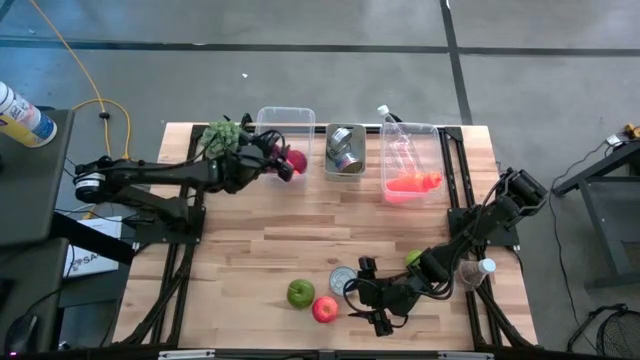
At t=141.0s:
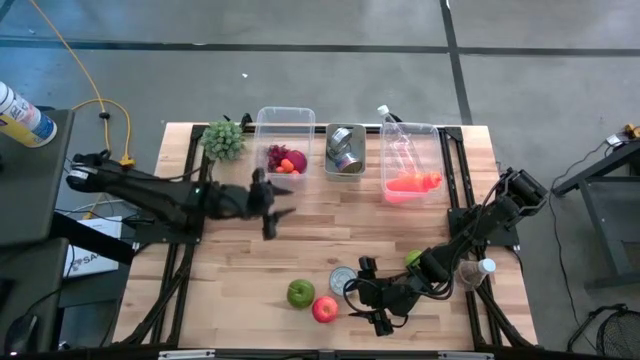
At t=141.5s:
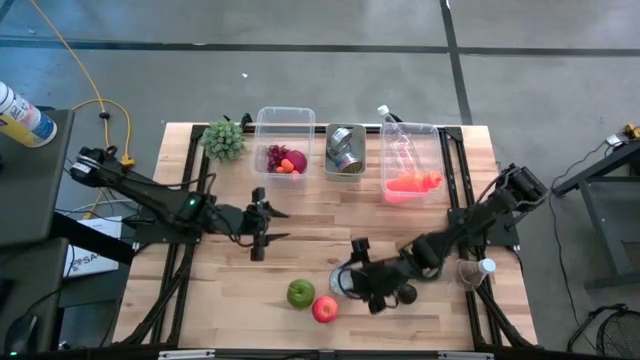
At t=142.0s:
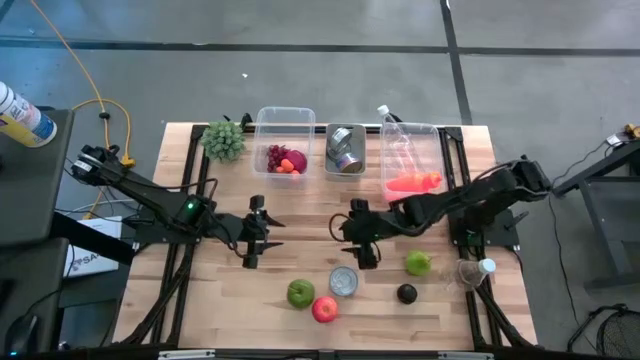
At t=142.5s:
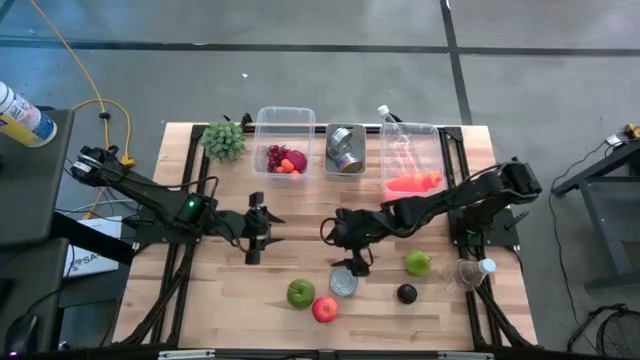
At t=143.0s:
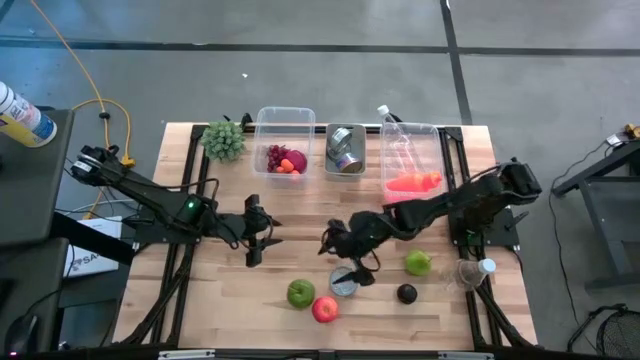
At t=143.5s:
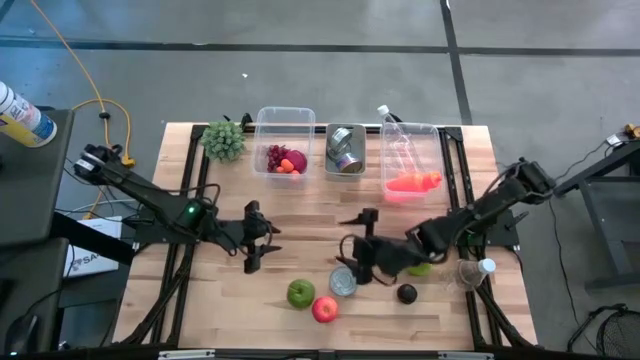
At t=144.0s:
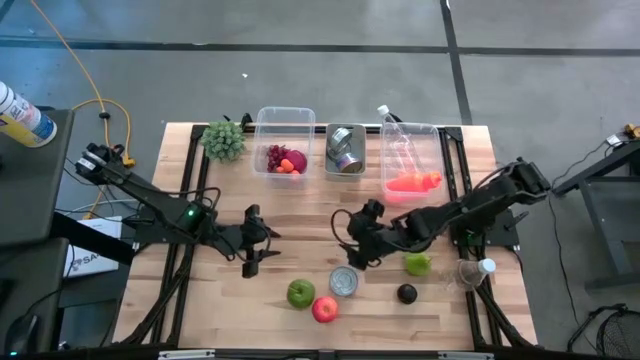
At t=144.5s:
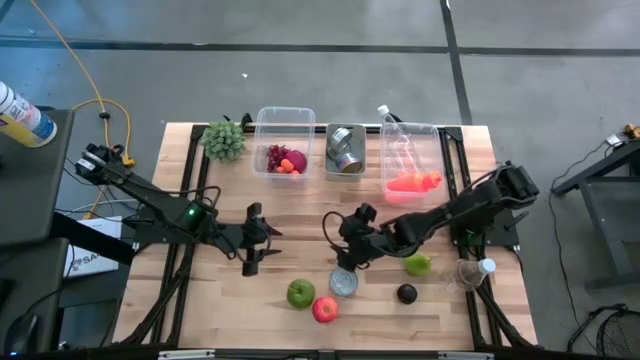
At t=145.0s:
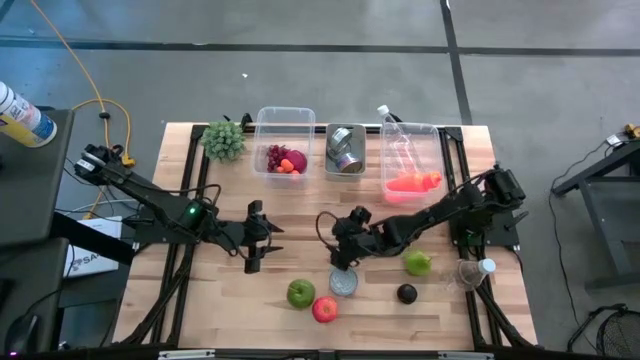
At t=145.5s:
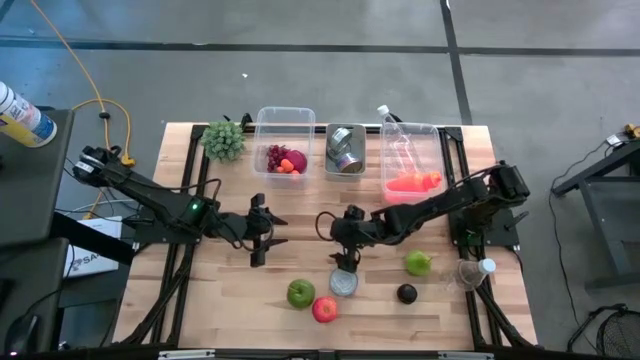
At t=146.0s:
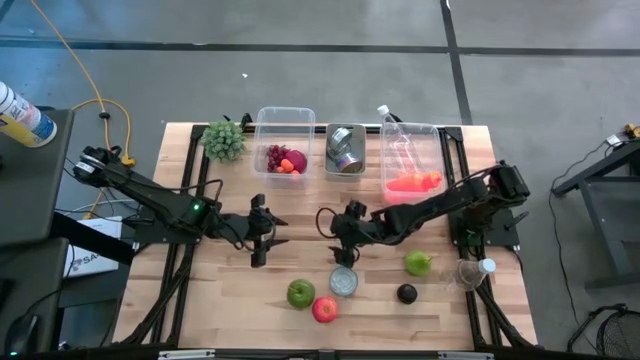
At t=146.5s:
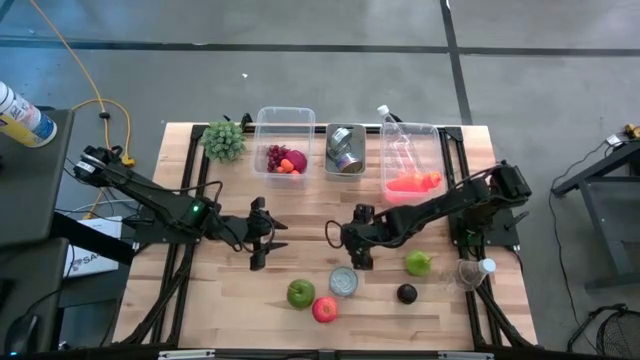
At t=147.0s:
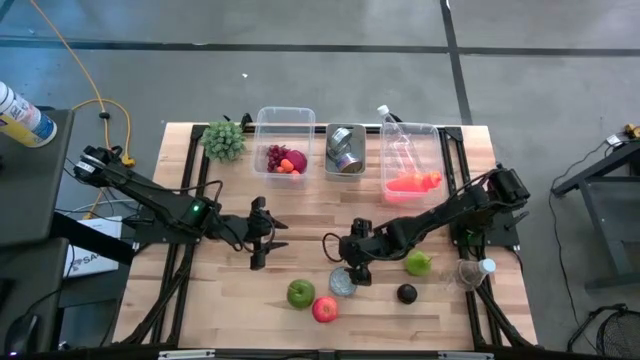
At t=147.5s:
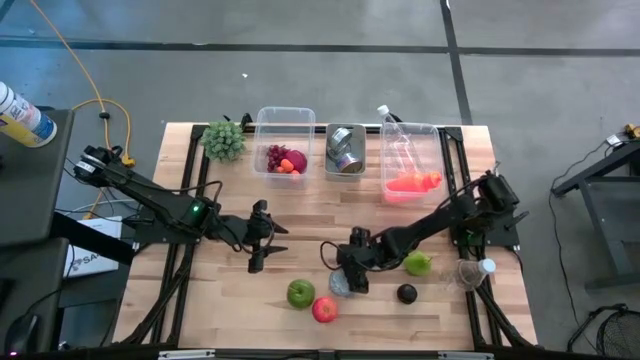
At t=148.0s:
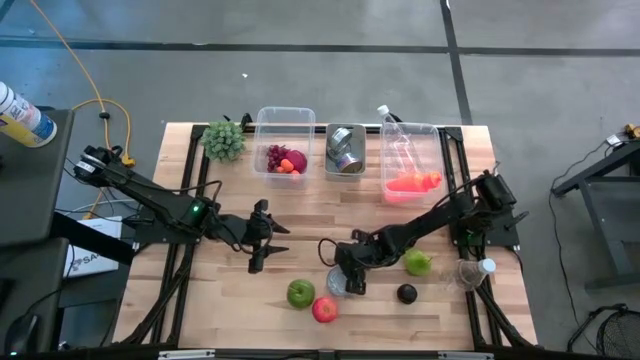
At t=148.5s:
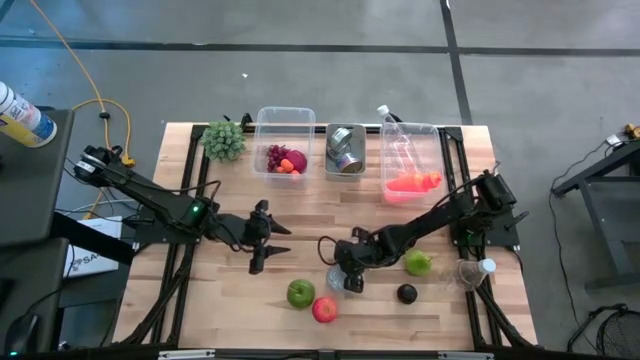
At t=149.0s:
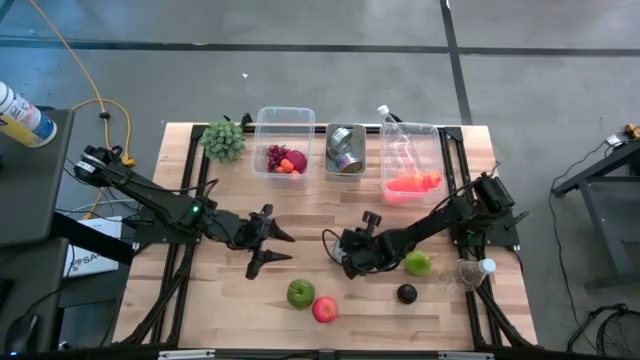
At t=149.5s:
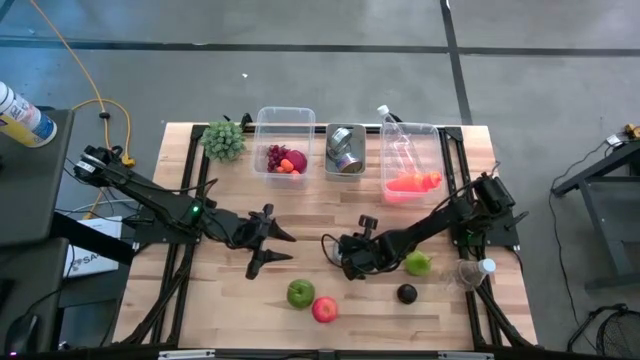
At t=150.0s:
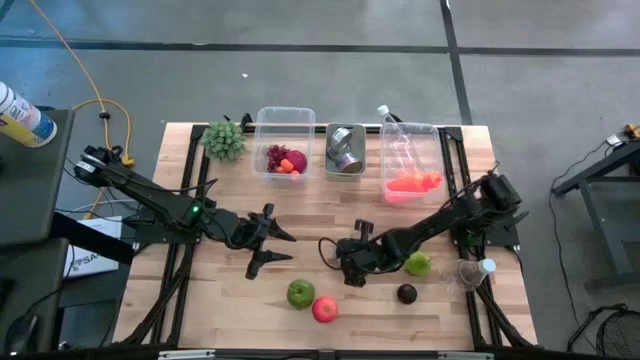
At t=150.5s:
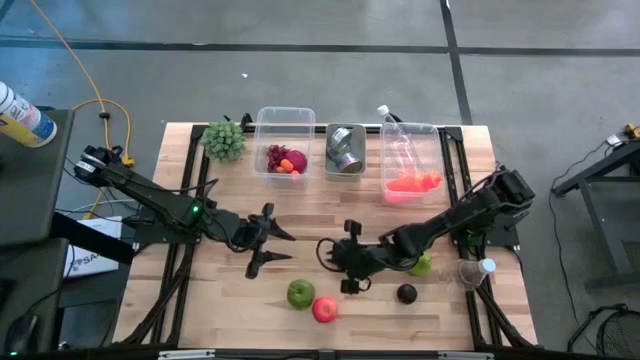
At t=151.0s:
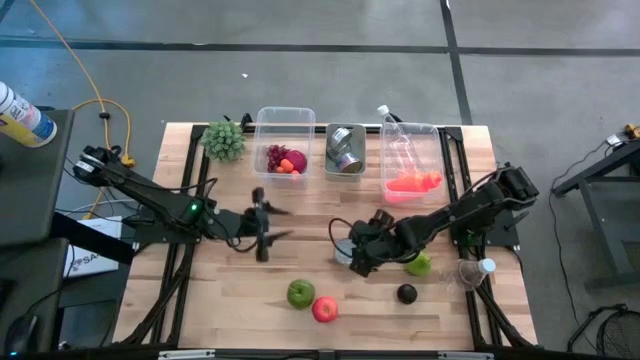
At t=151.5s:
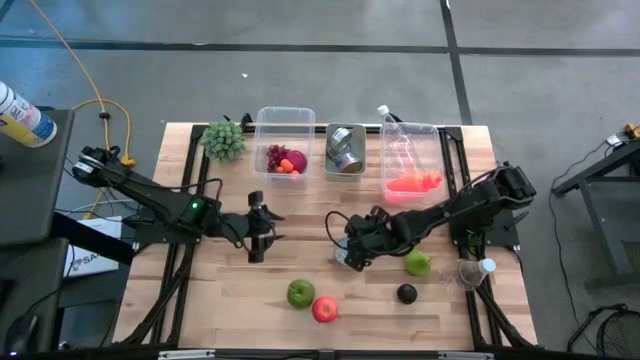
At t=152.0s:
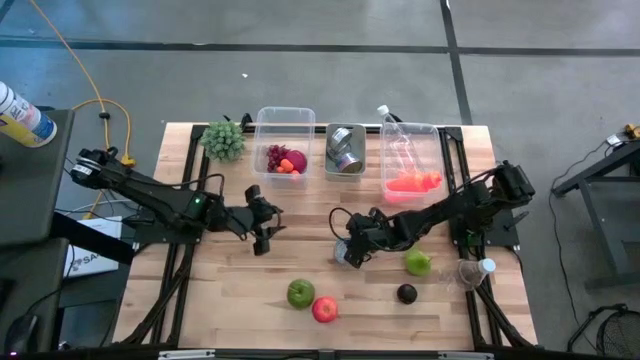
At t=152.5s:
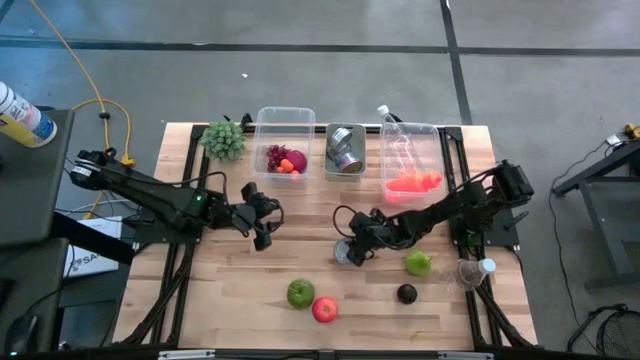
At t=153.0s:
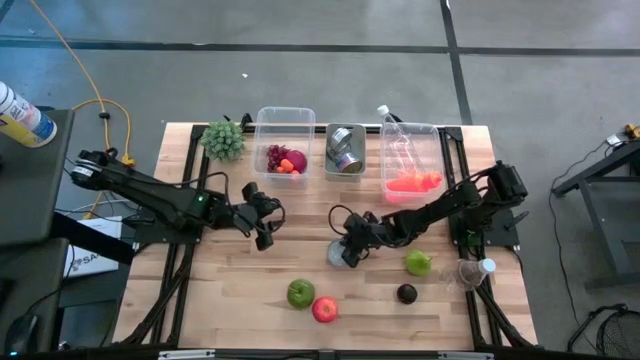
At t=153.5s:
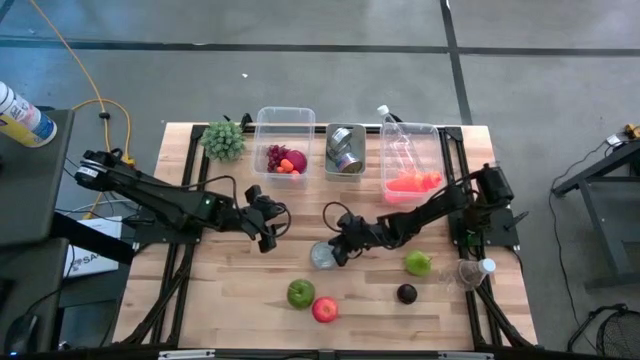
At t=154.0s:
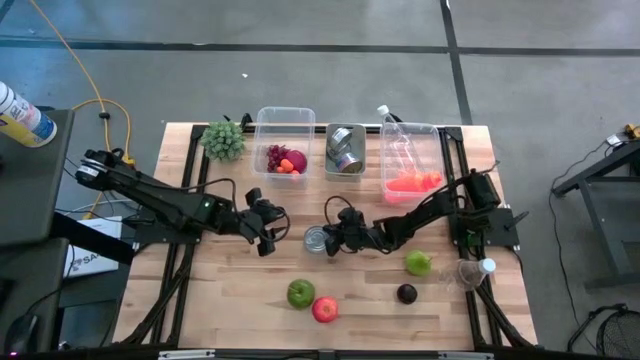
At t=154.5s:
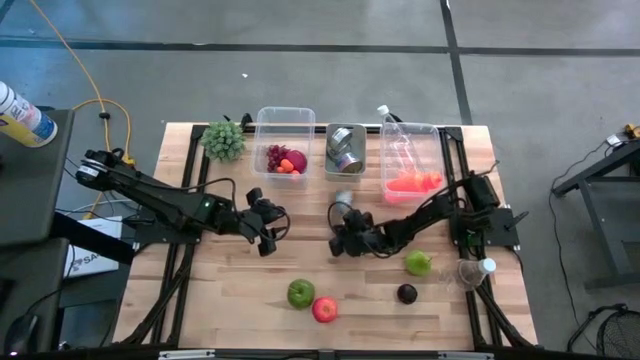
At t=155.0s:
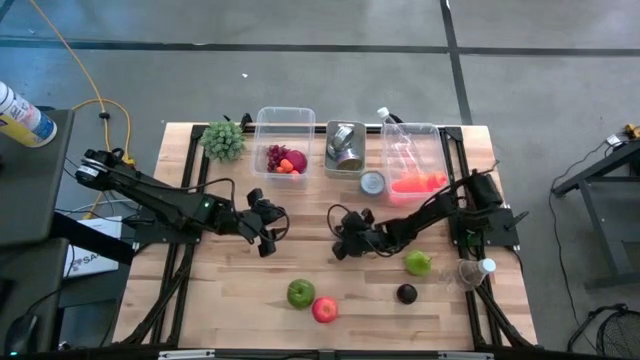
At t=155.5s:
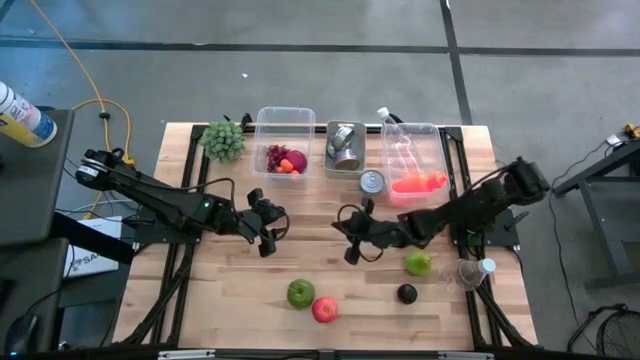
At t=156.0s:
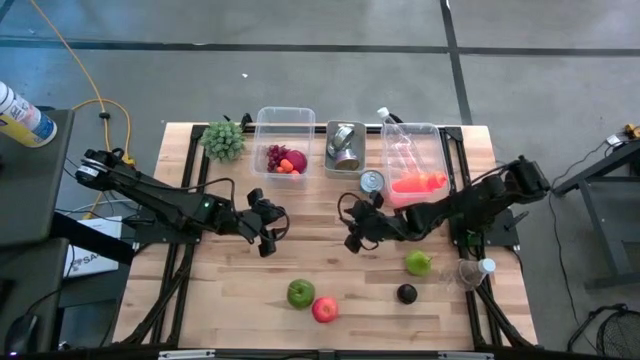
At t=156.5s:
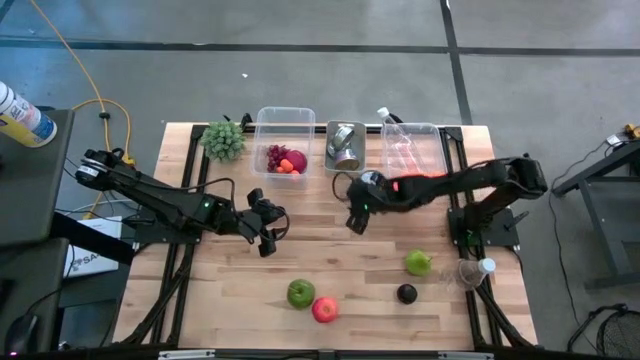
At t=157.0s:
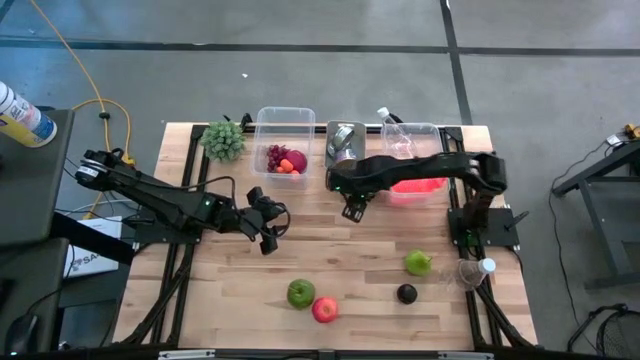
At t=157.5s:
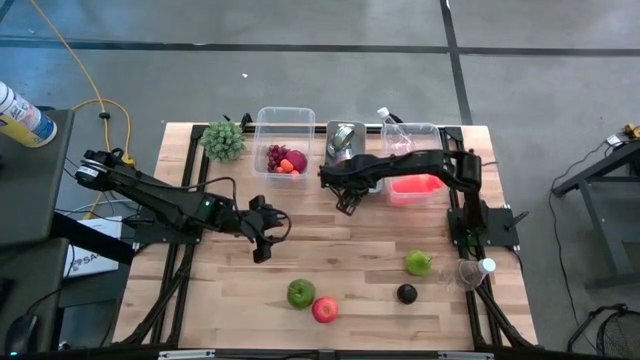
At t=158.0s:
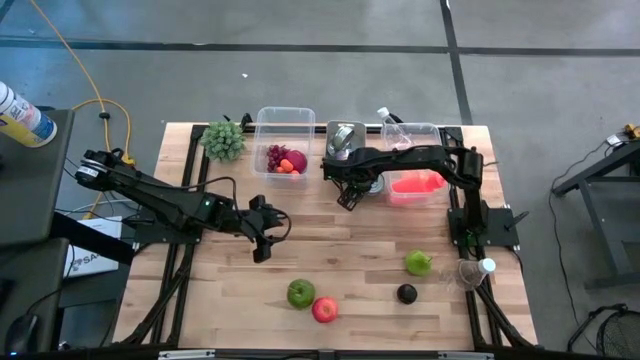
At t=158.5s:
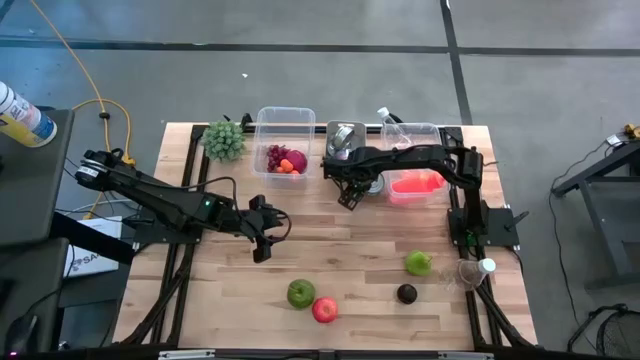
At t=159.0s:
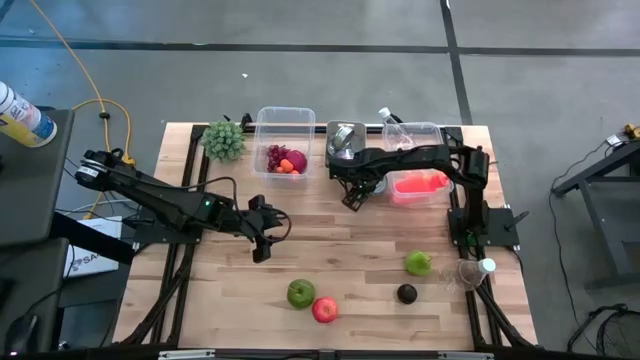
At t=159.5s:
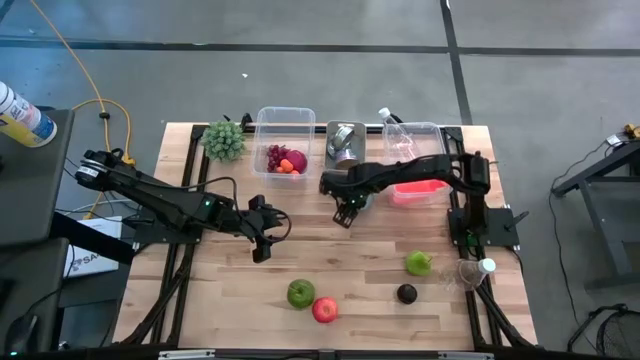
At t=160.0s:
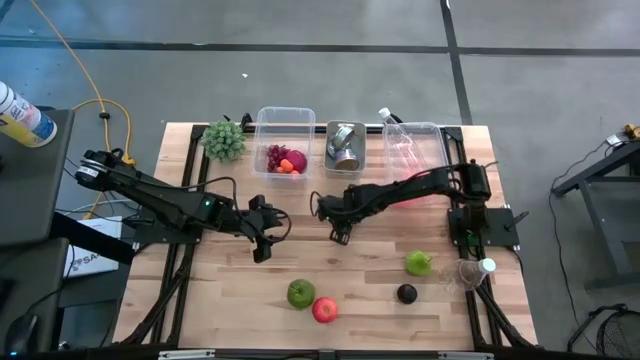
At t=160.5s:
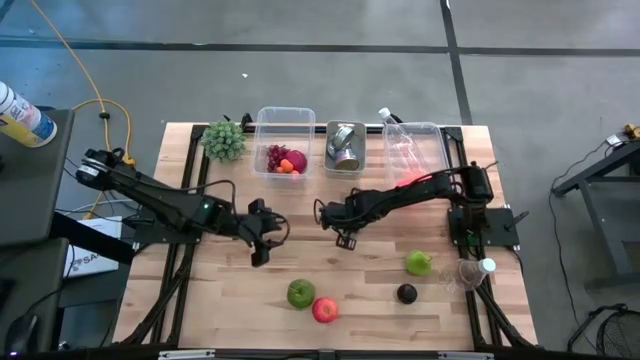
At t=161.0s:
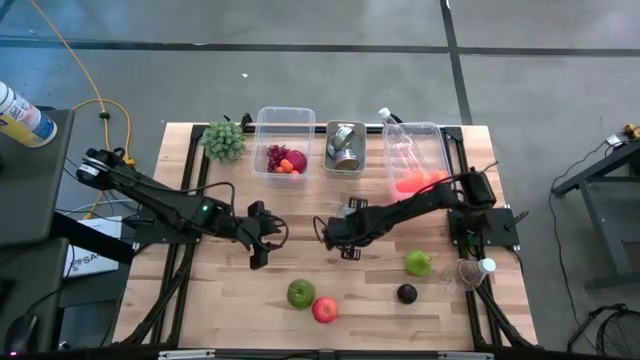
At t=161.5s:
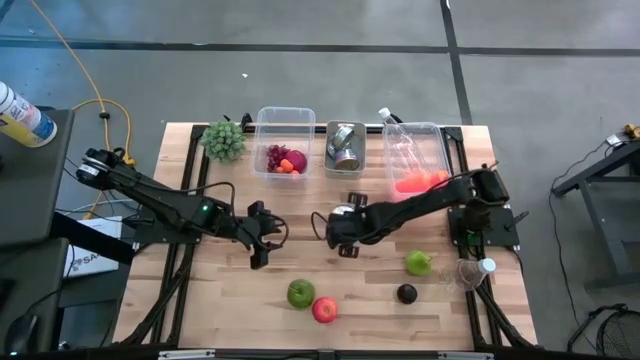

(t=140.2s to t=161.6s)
Task: Pick & Place Food Item
Put the light blue tuna can into the white bin
